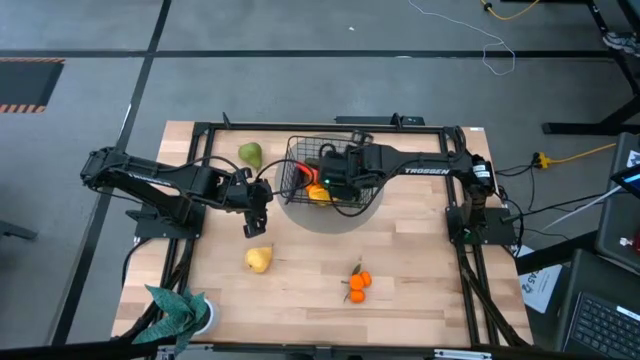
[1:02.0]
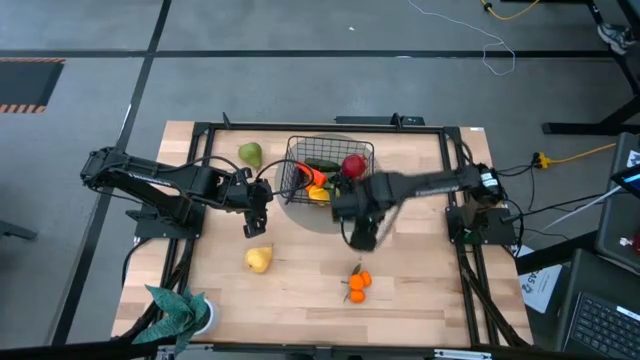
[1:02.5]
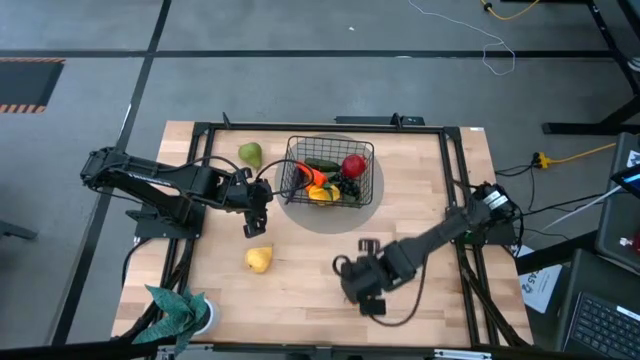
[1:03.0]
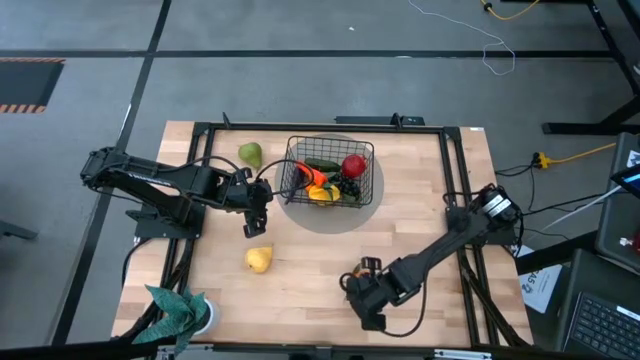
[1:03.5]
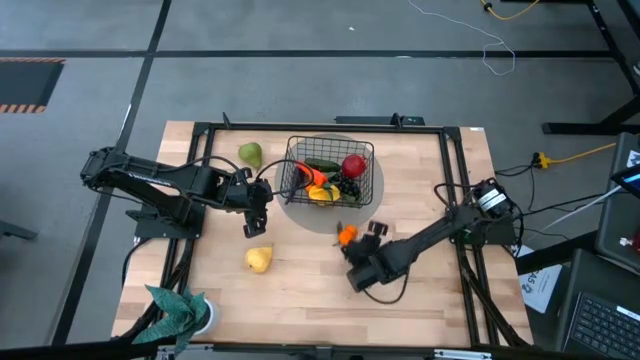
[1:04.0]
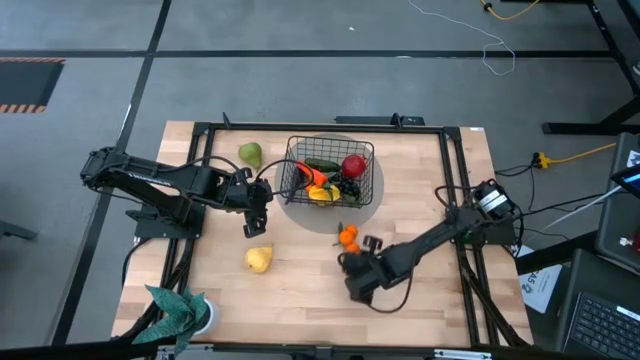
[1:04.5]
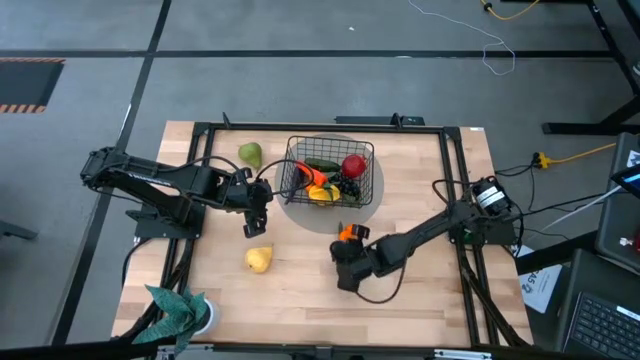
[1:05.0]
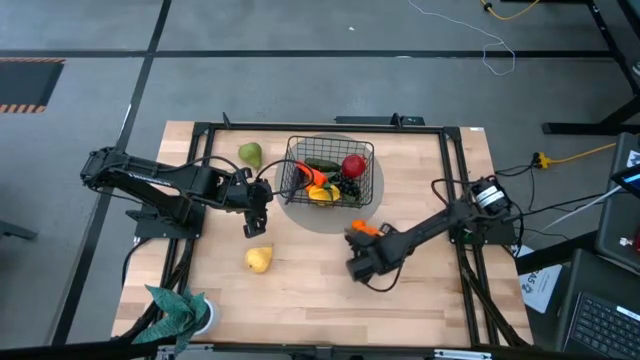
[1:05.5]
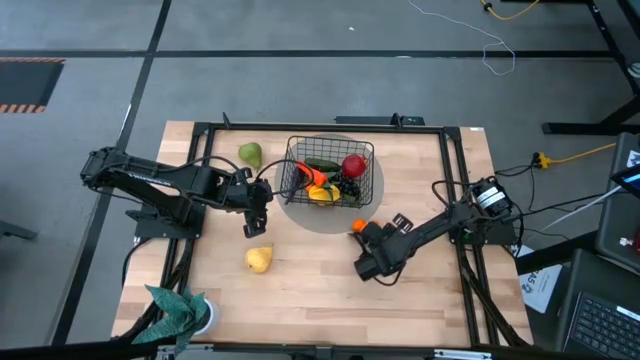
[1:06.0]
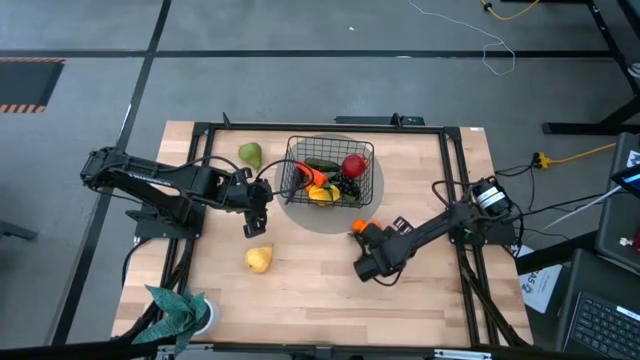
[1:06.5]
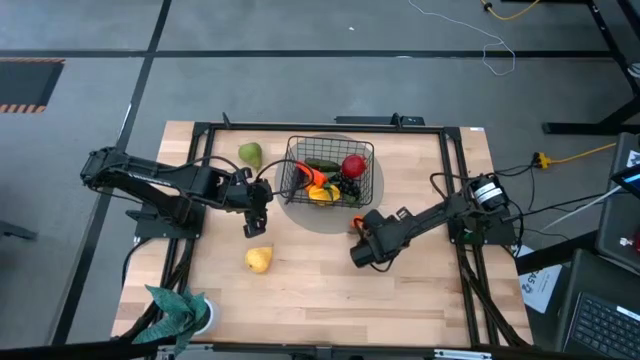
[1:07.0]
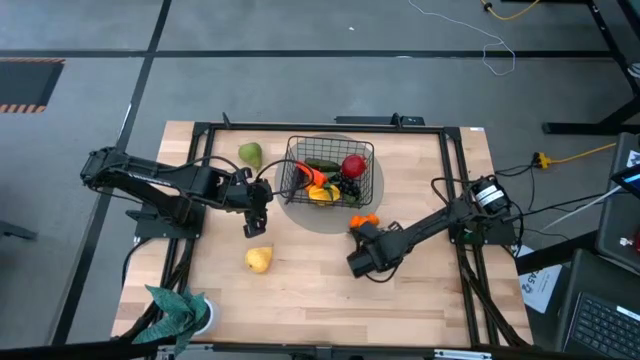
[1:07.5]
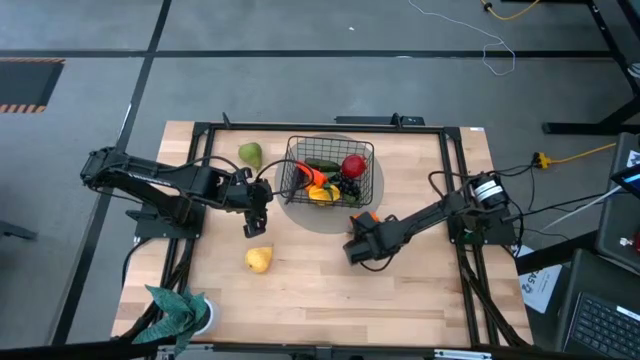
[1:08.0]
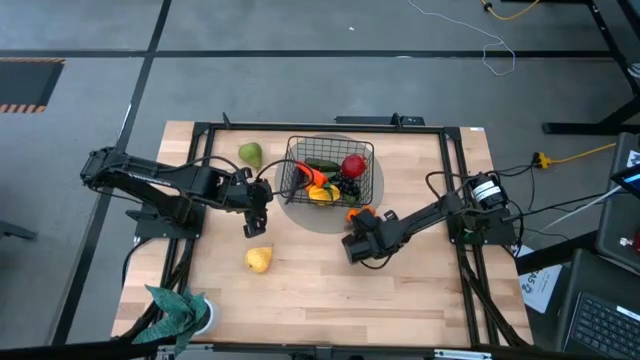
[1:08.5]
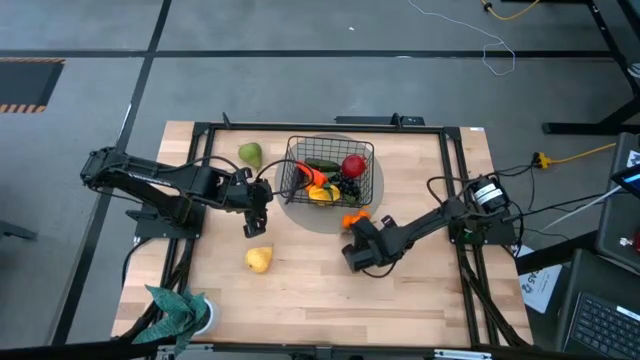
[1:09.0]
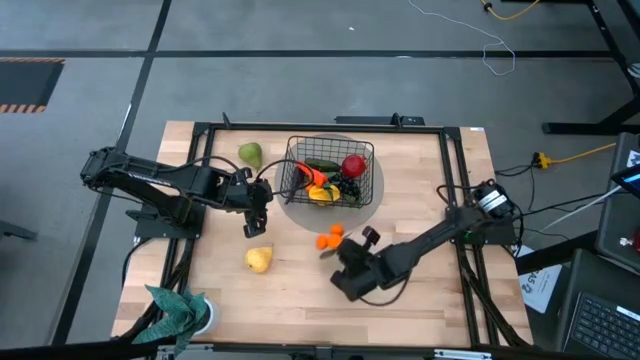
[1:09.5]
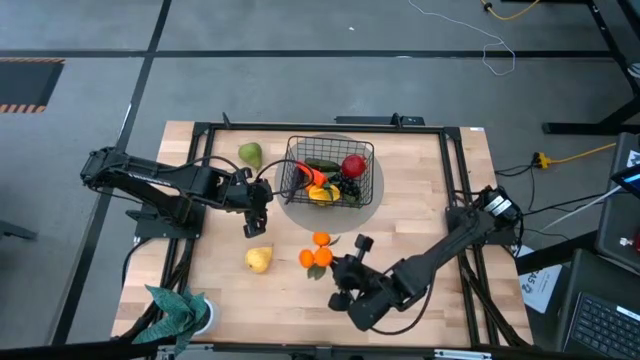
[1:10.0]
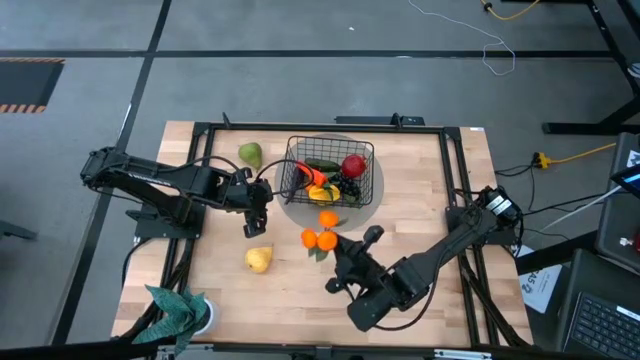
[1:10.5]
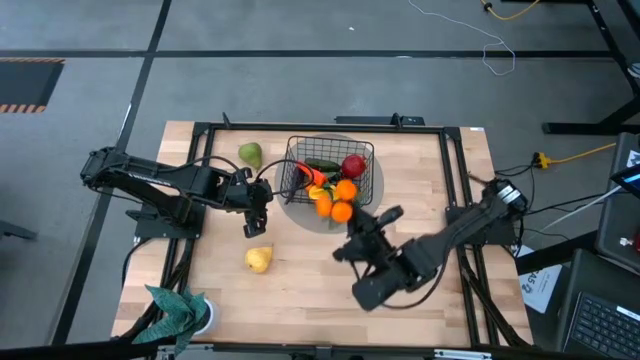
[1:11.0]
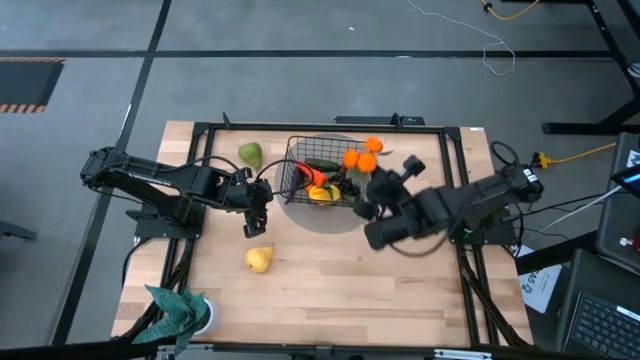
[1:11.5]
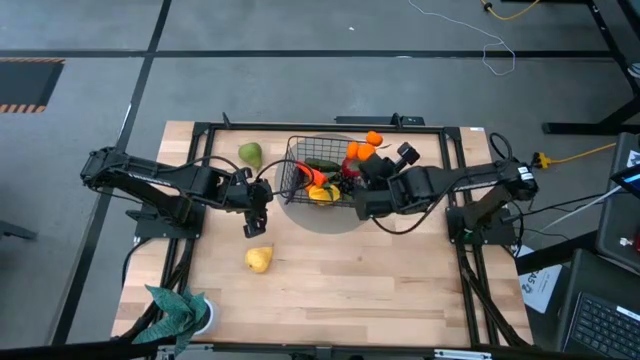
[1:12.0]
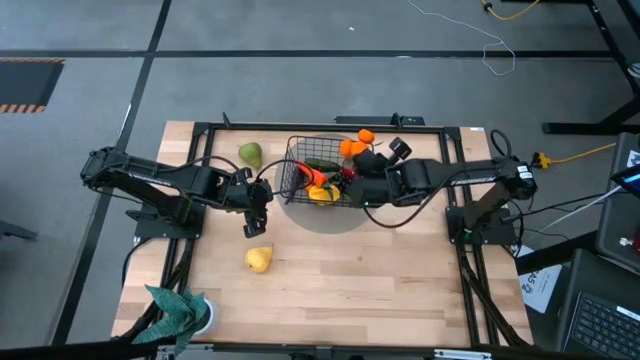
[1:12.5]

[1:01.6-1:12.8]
Task: Build produce basket
Put the oranges into the black wire basket

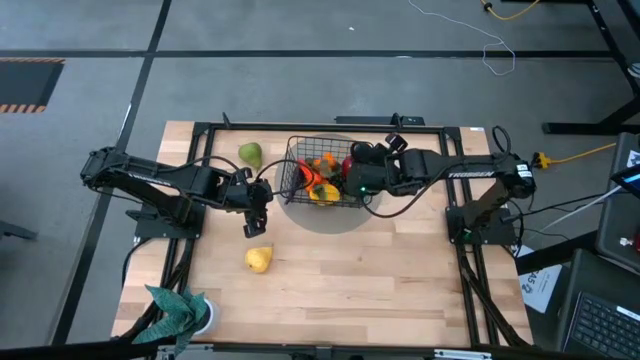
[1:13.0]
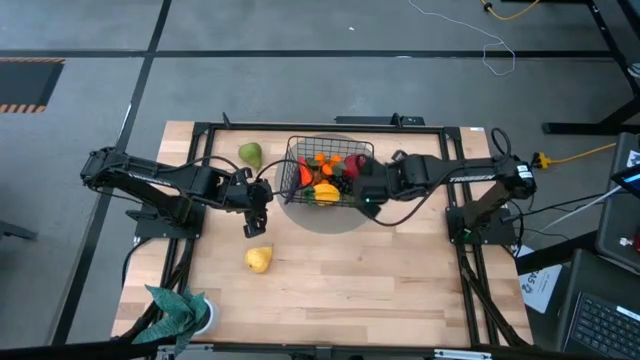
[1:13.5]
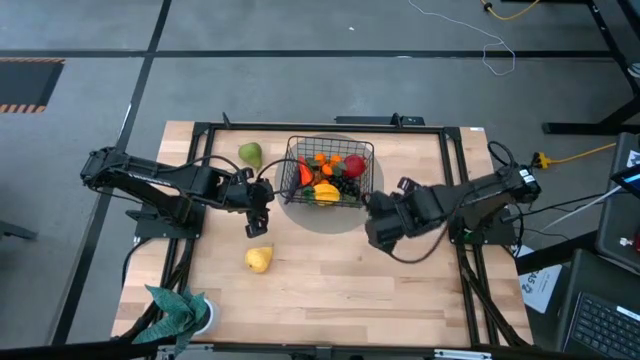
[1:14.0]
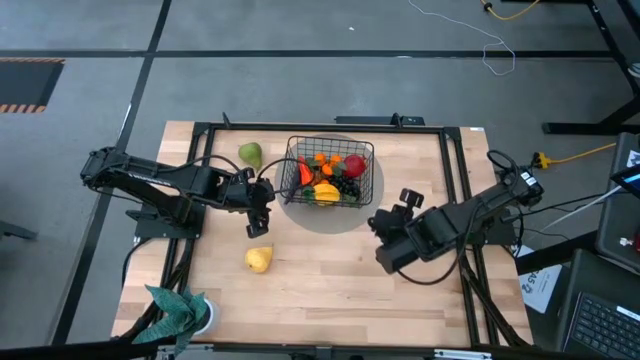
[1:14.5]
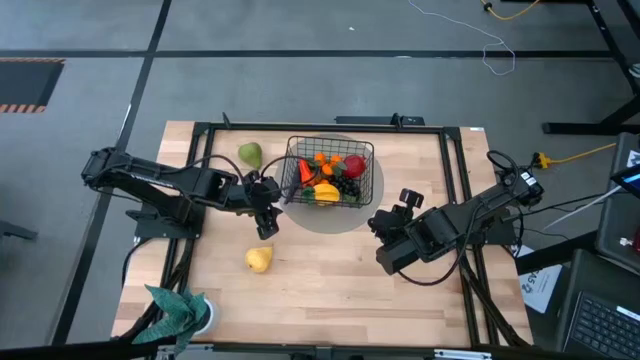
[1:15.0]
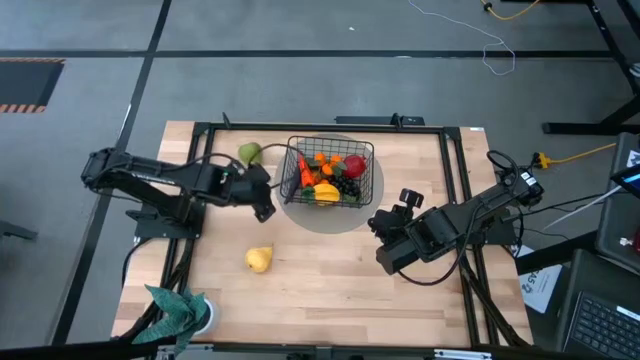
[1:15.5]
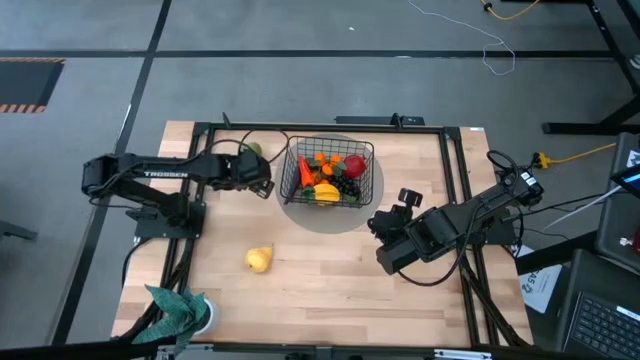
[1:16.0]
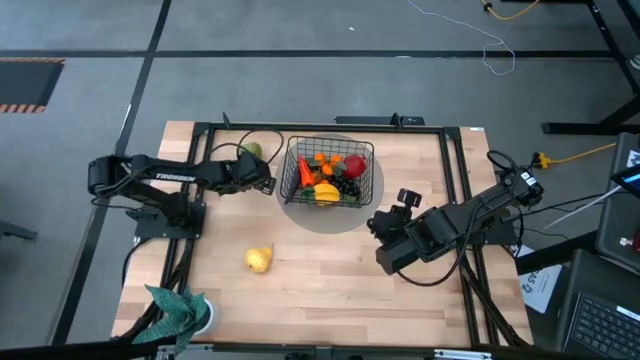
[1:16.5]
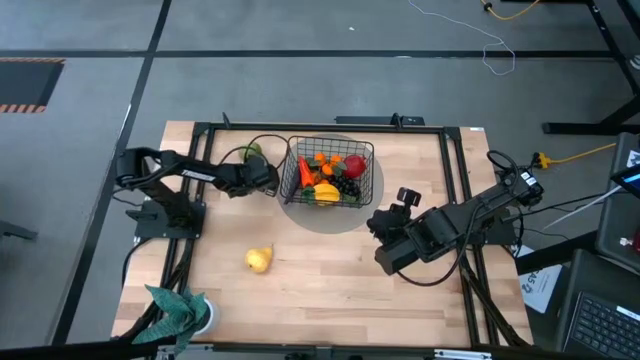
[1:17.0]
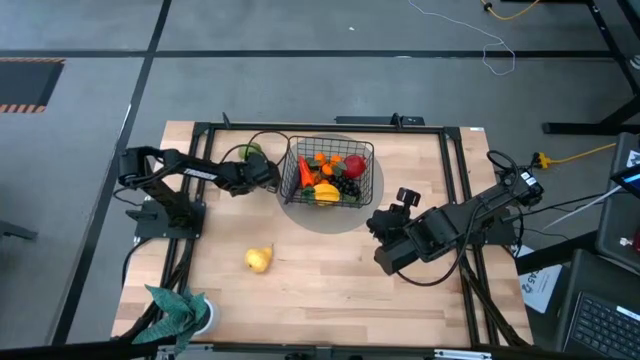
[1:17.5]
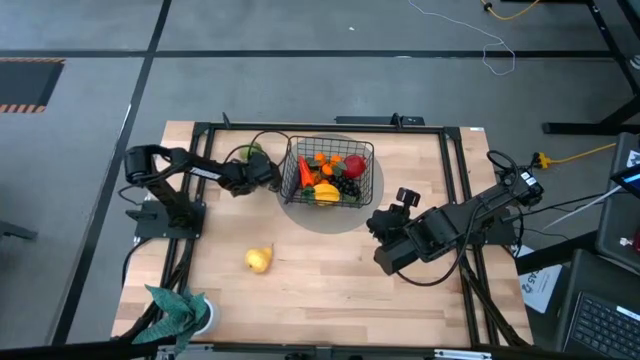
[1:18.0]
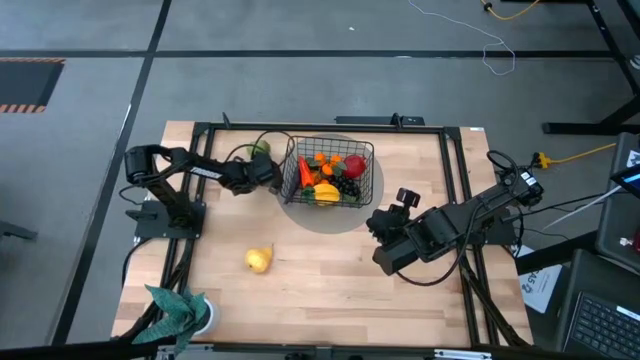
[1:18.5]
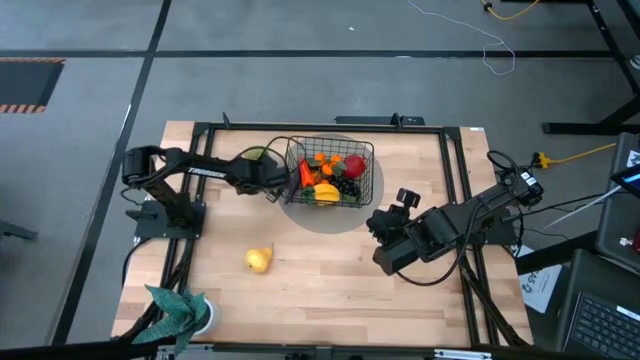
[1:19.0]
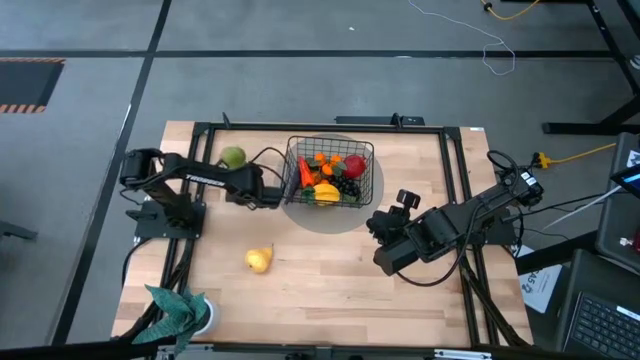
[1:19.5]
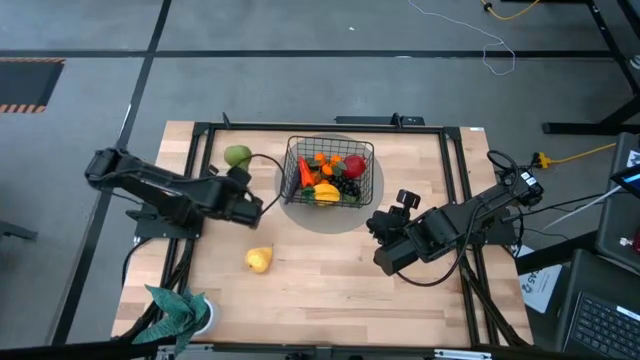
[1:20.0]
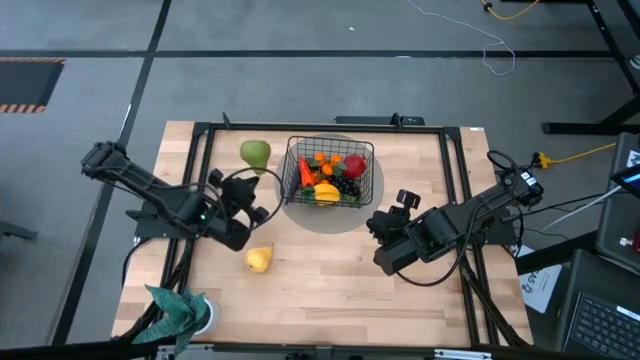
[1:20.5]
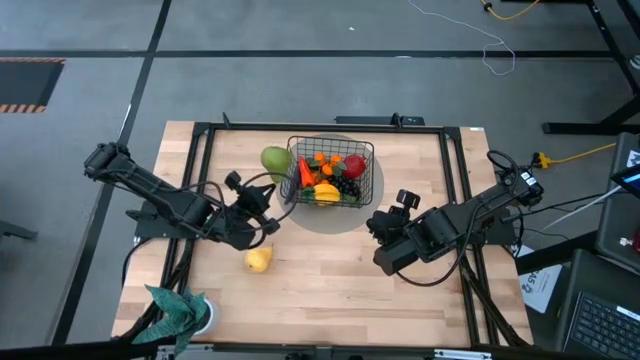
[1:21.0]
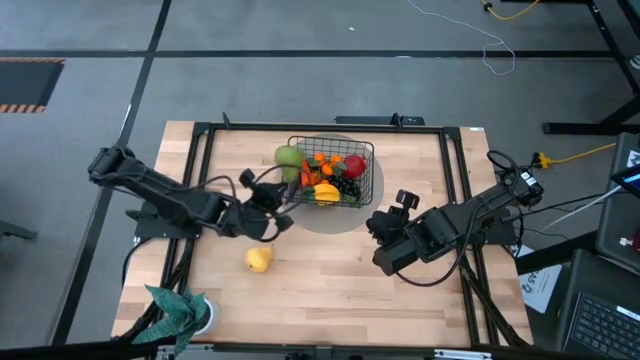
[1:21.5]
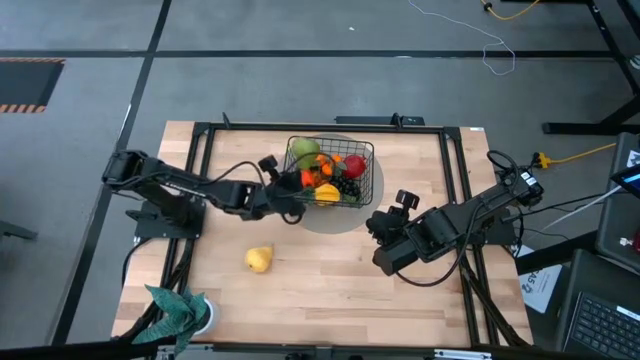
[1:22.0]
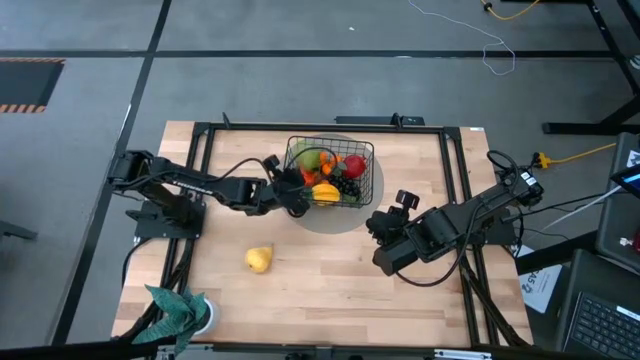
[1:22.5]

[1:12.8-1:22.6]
Put the green pear into the black wire basket
